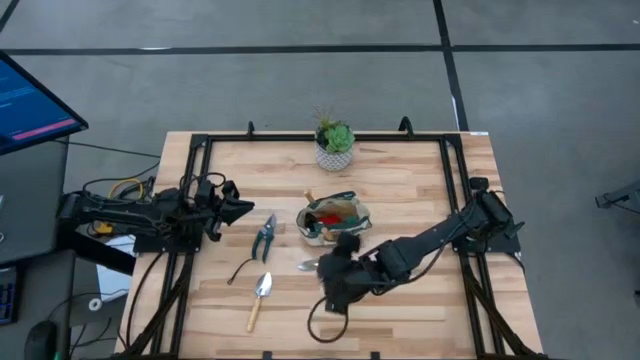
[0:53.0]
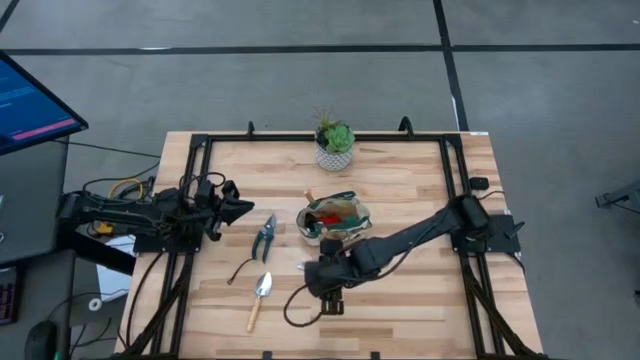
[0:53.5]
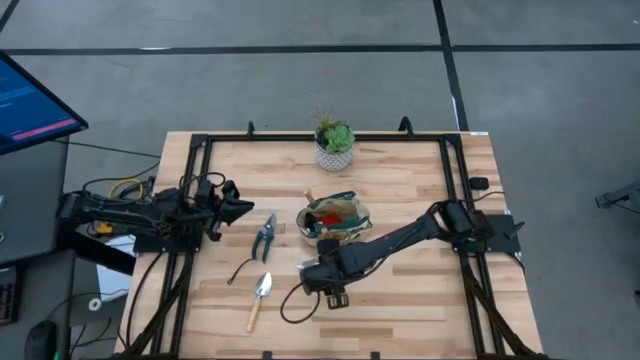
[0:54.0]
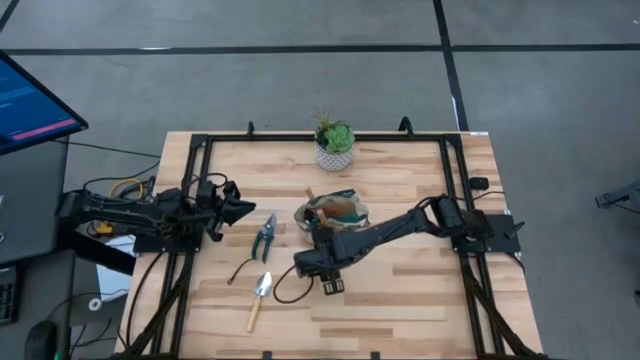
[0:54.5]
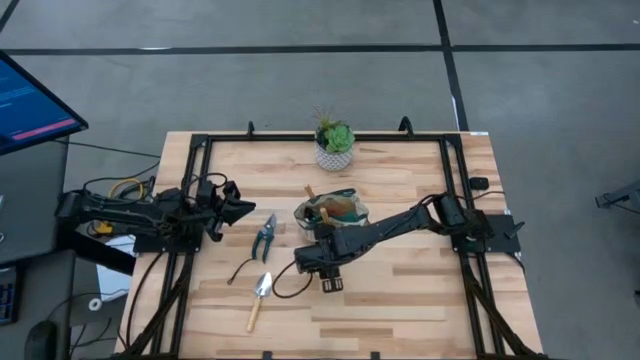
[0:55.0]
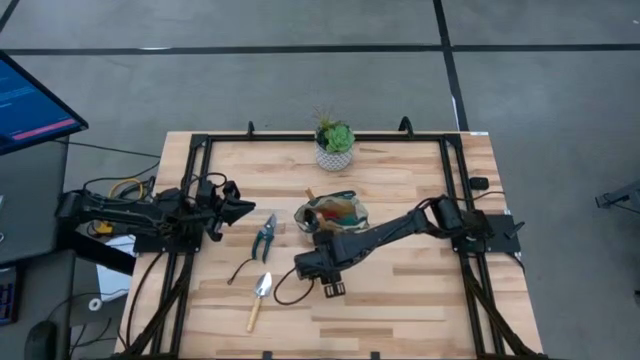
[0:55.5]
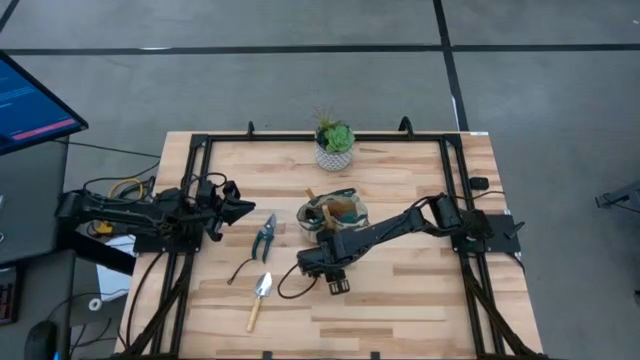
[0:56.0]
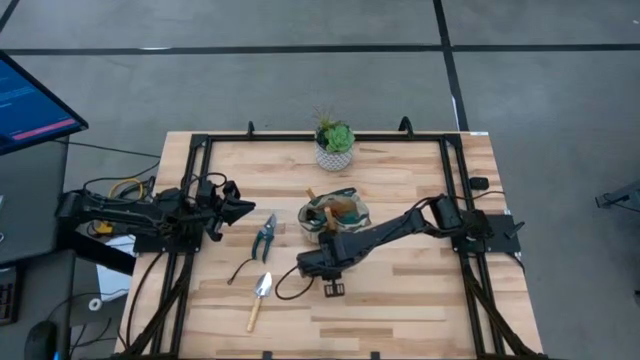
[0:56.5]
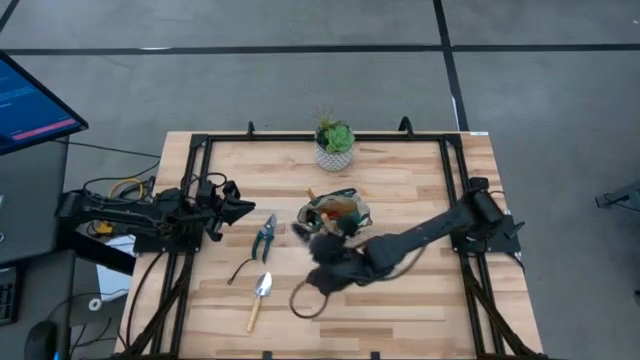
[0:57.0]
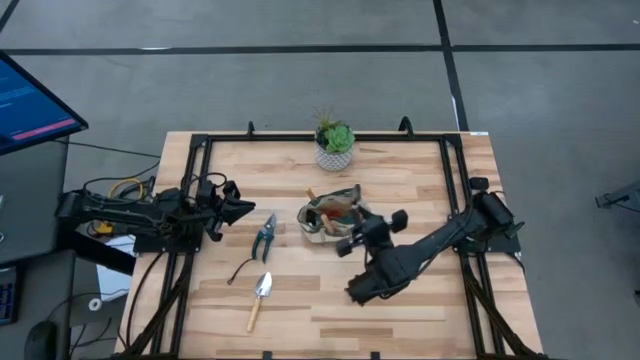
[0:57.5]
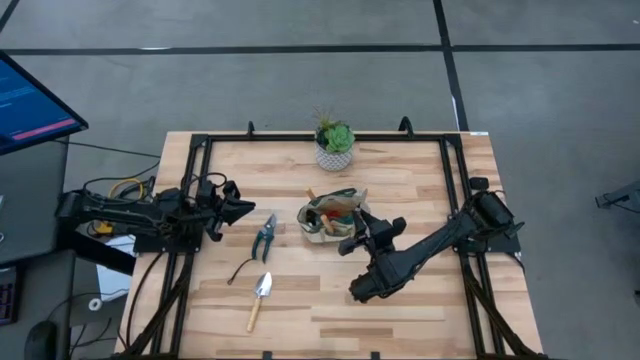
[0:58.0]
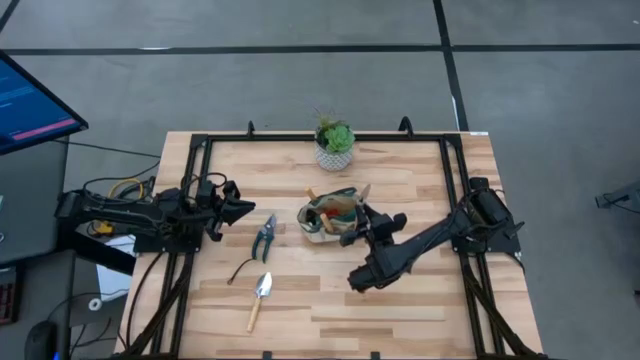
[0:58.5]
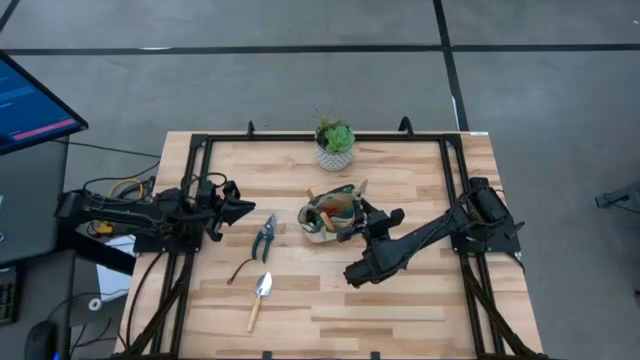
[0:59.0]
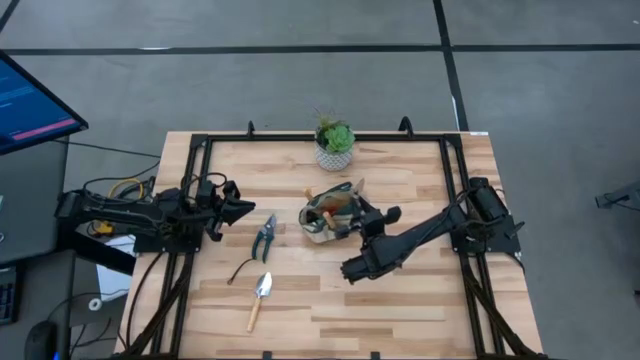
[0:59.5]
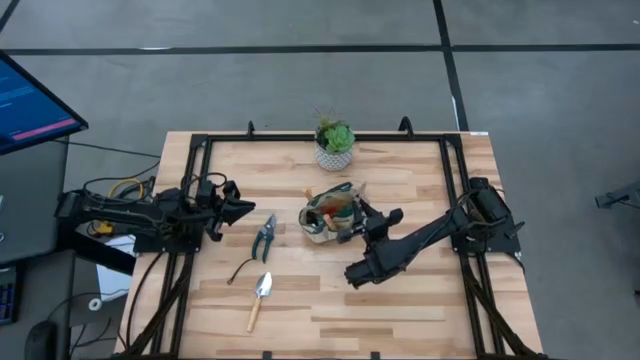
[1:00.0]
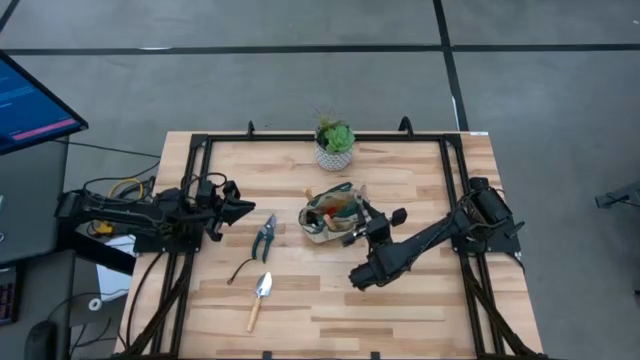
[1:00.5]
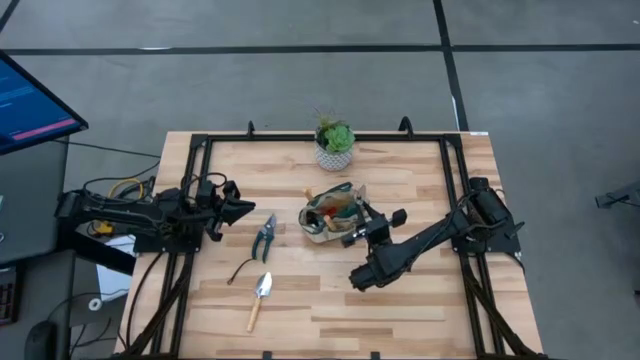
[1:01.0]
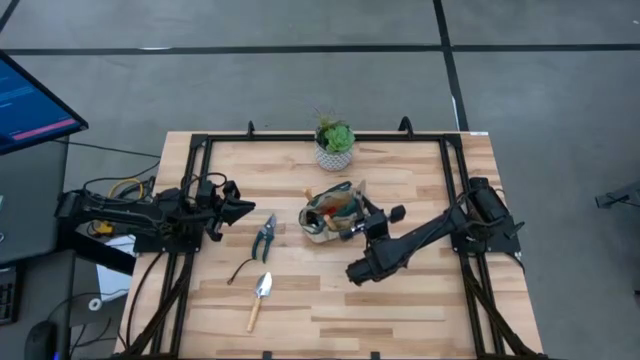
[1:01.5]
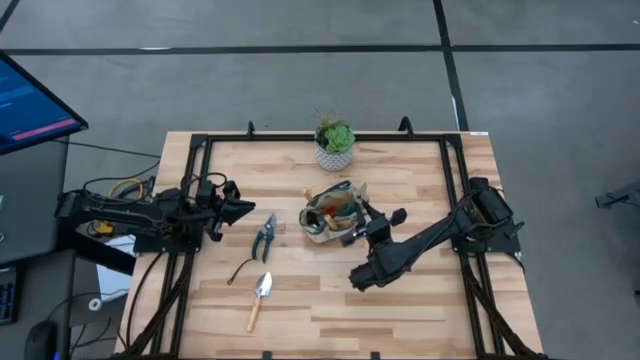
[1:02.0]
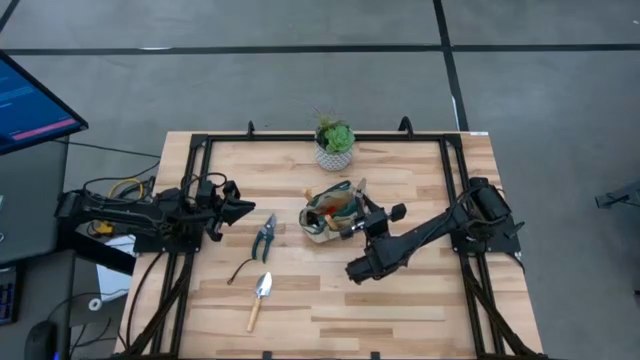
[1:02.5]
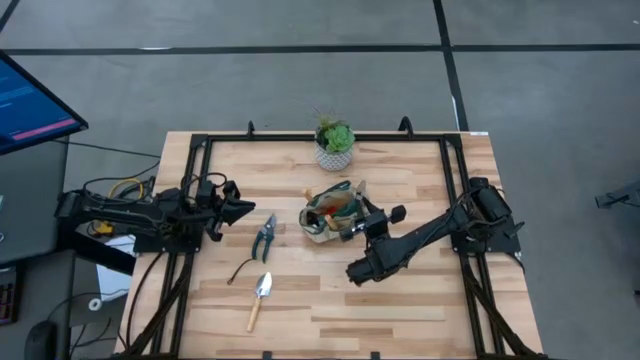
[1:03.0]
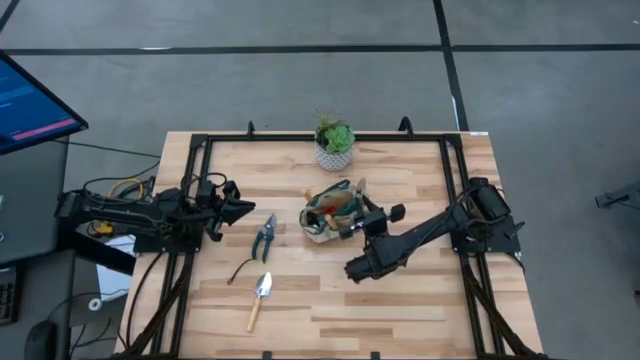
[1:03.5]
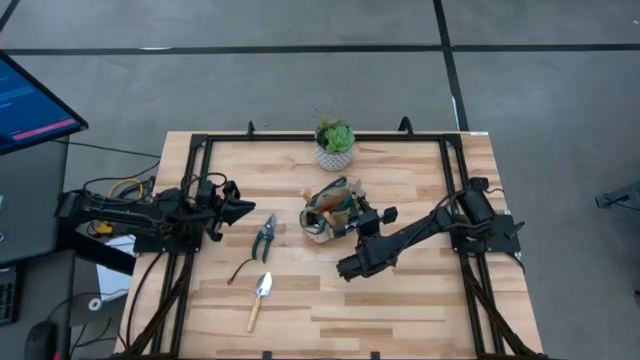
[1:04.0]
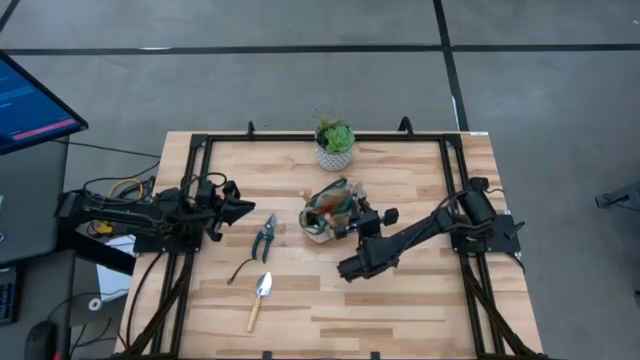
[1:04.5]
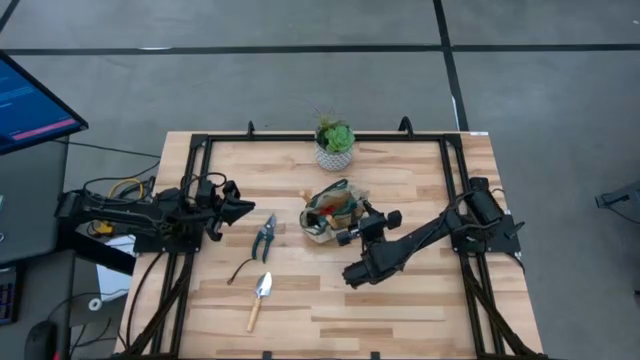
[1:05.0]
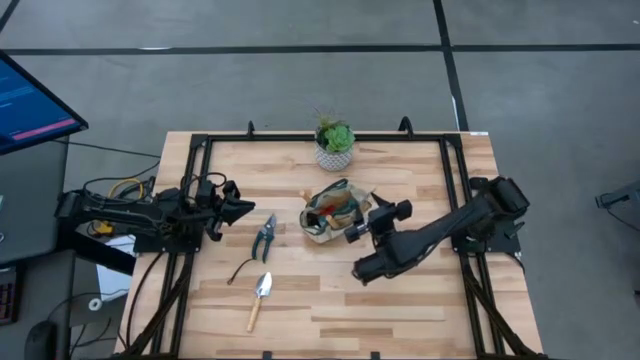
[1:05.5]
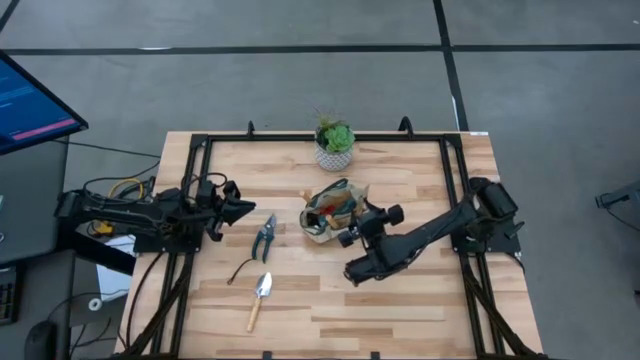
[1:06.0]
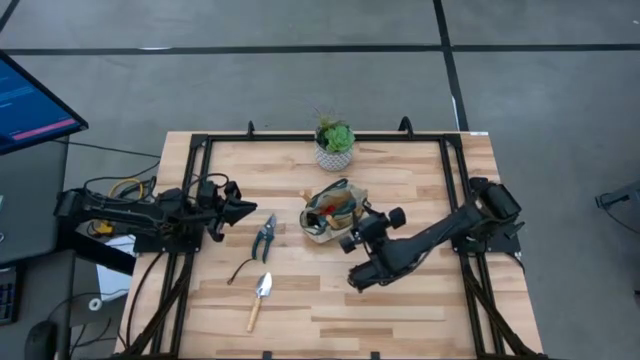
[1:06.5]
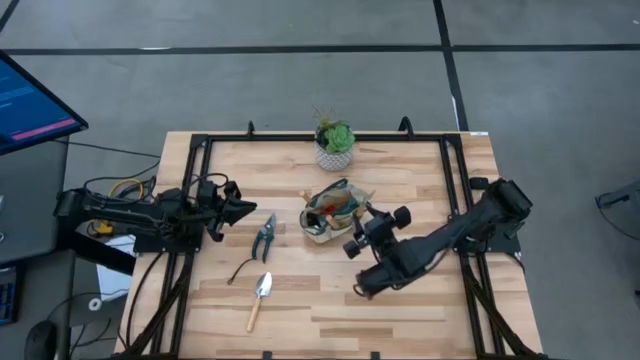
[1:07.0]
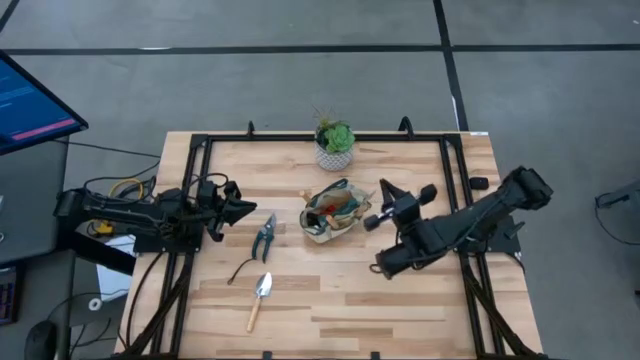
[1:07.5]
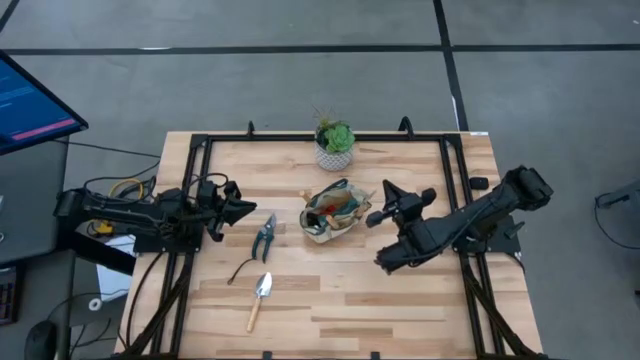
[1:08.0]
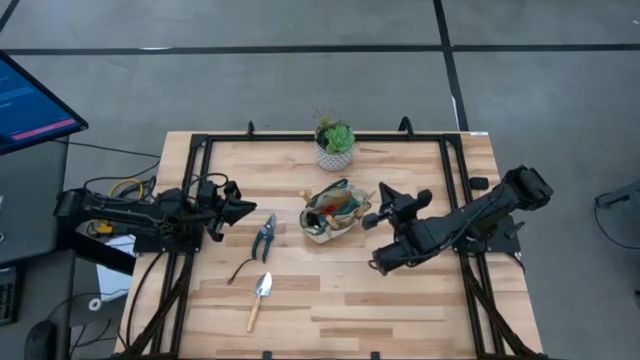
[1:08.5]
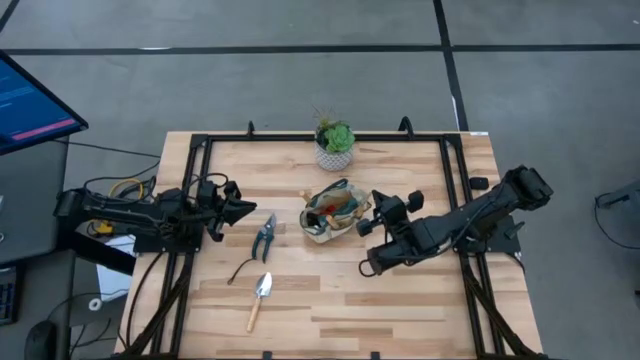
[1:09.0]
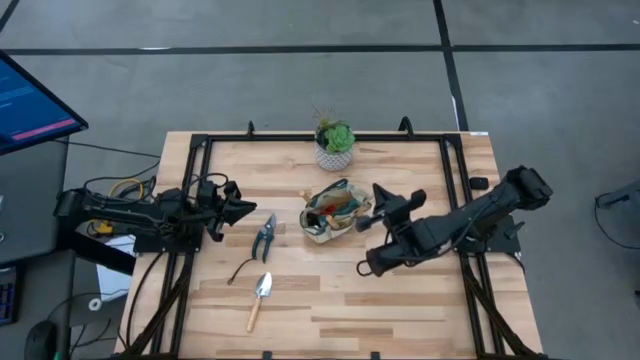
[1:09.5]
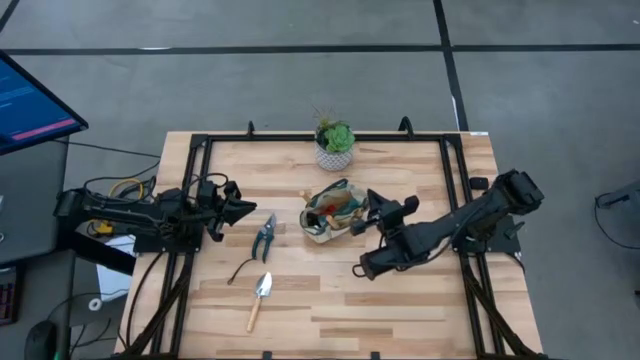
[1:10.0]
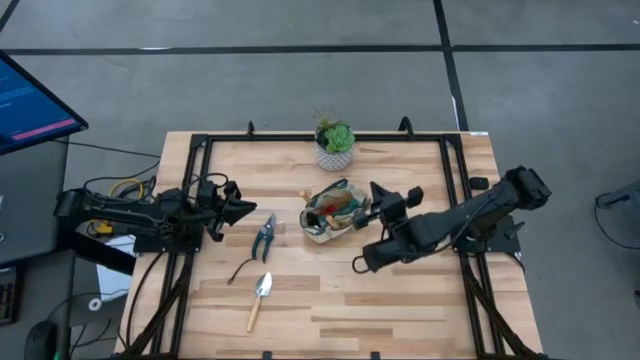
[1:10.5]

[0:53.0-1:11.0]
Task: Pick & Place Garden tools in Gardening bag
Put the trowel into the side pocket of the gardening bag

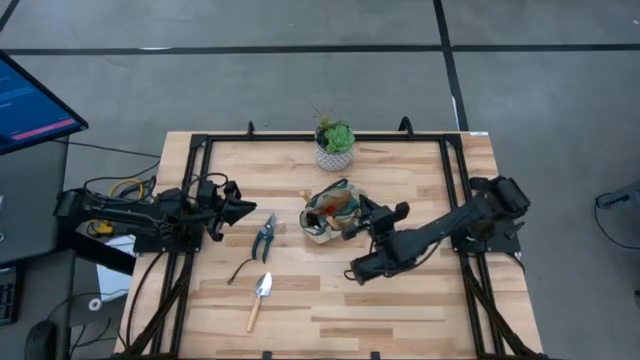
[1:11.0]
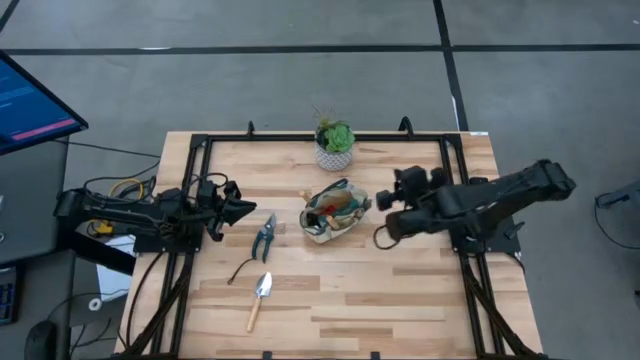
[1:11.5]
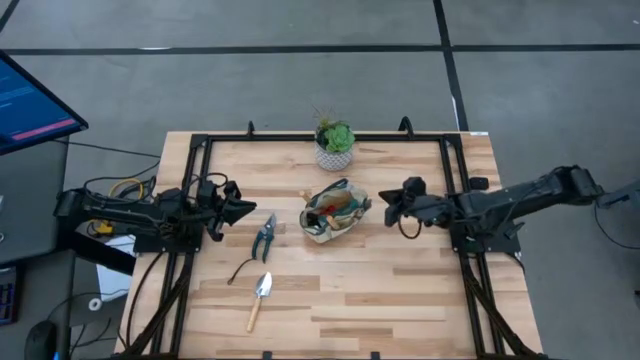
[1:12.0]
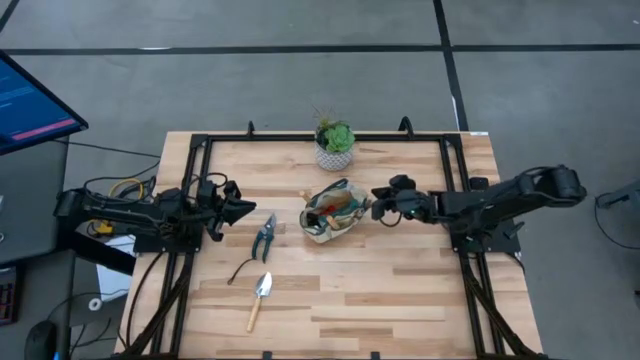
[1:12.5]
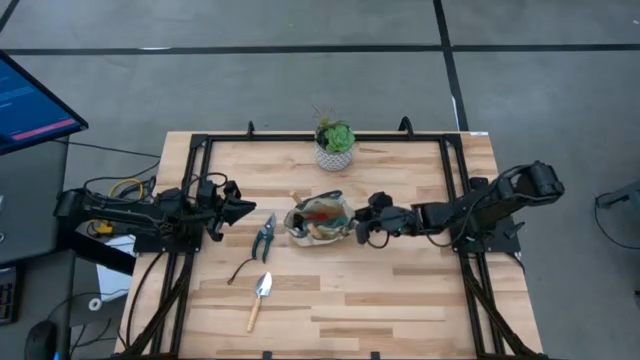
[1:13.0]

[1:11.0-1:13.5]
Adjust the gardening bag

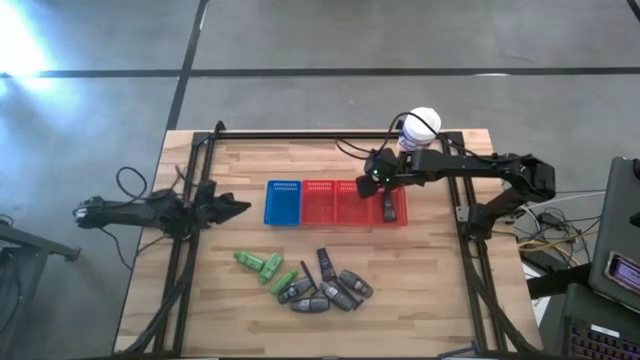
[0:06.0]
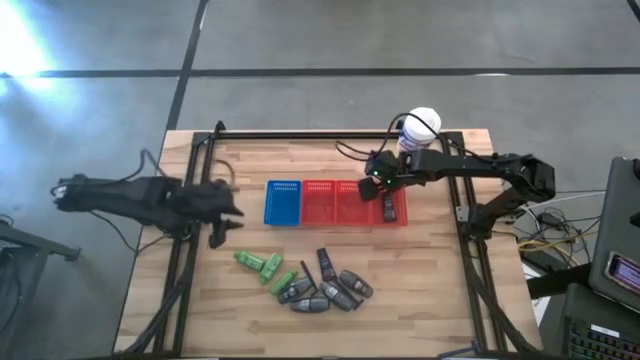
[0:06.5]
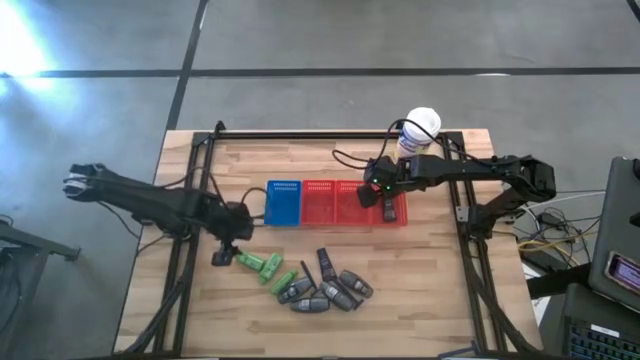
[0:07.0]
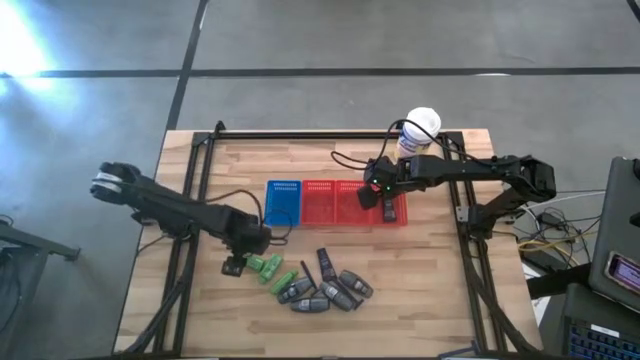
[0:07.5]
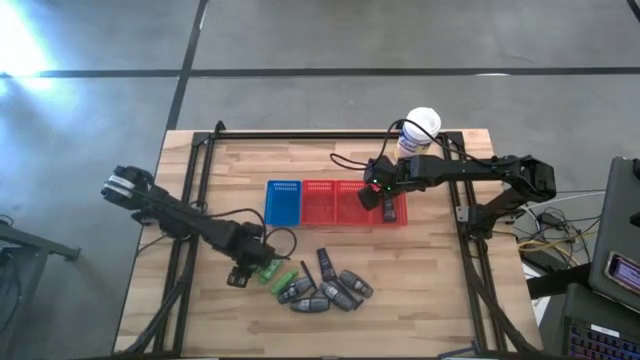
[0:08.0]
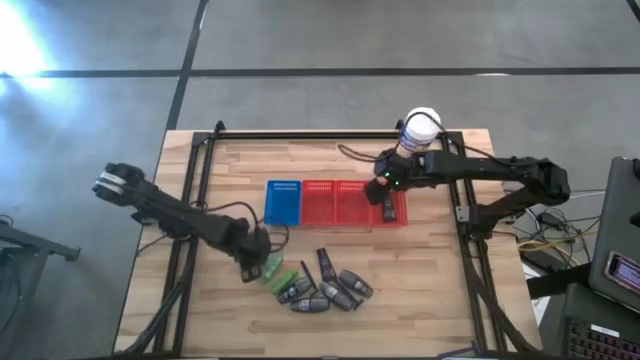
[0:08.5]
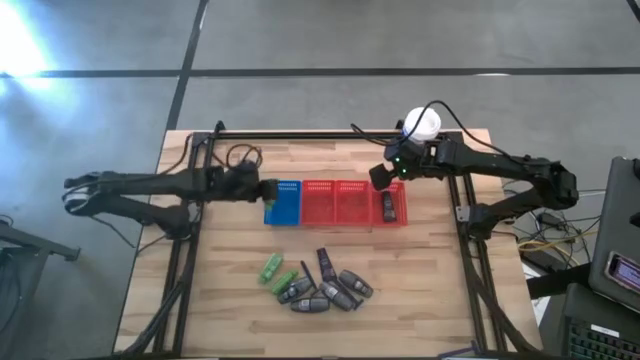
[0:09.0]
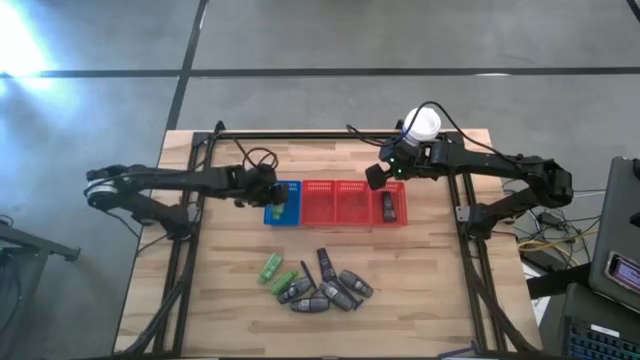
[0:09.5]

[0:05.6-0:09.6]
Task: Pick & Place Travel size toiletries
Put the green shampoo into the blue bin
